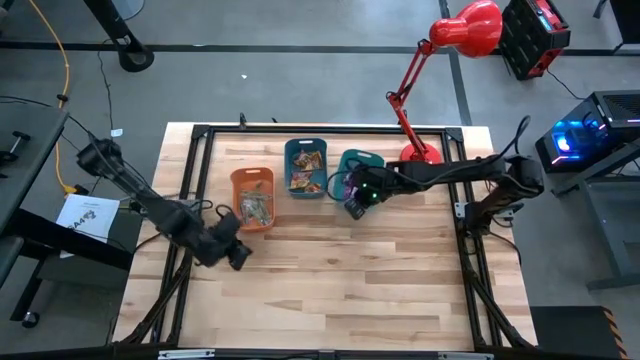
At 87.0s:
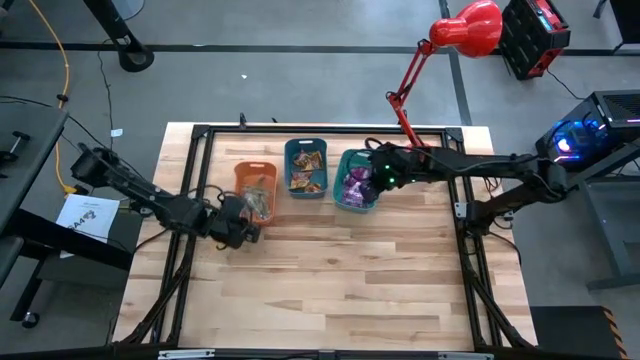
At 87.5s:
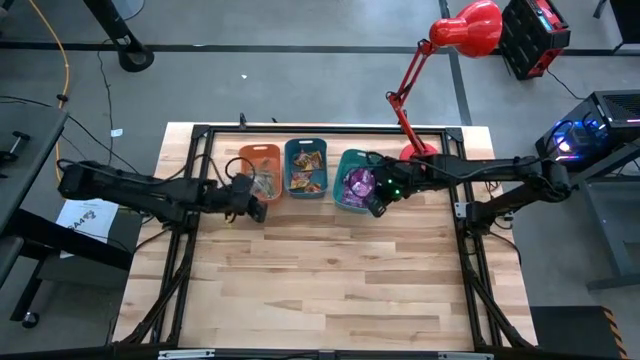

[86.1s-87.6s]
Task: Sort candy
Adjust the orange bin

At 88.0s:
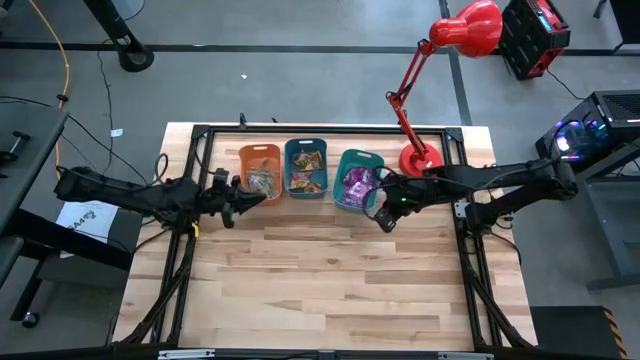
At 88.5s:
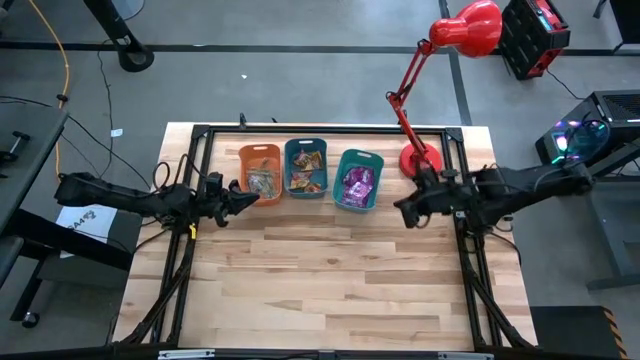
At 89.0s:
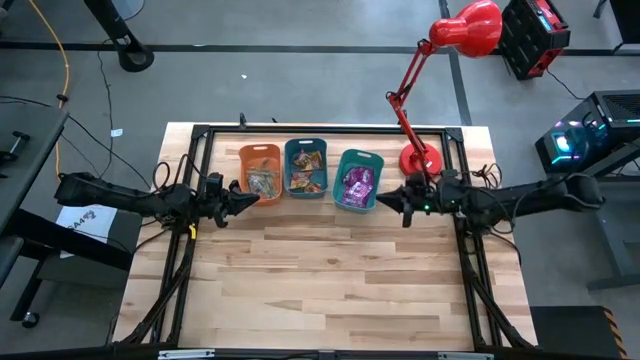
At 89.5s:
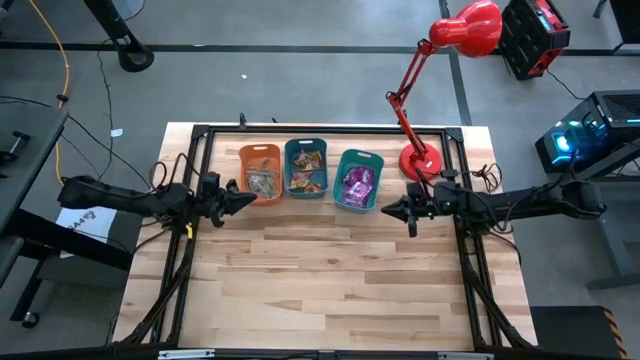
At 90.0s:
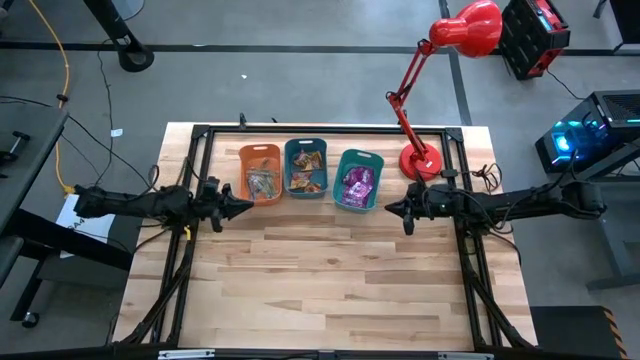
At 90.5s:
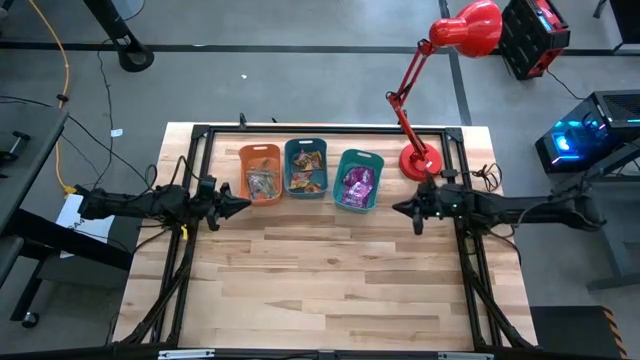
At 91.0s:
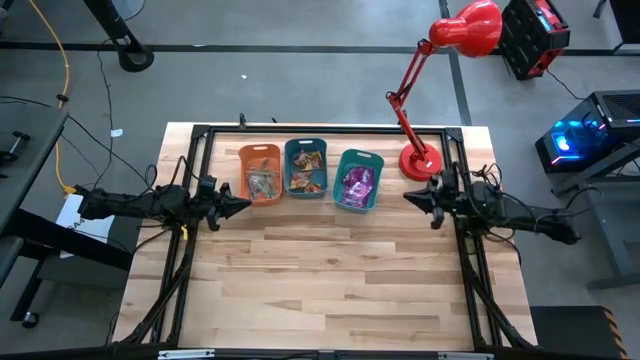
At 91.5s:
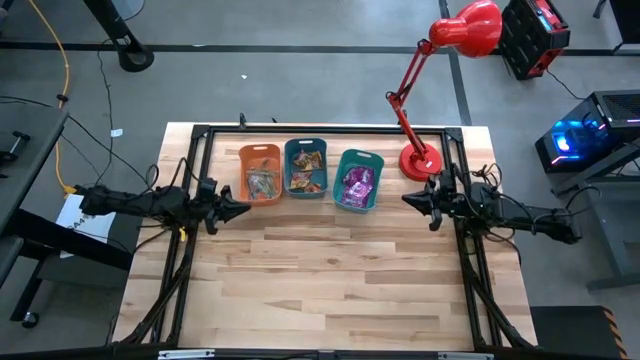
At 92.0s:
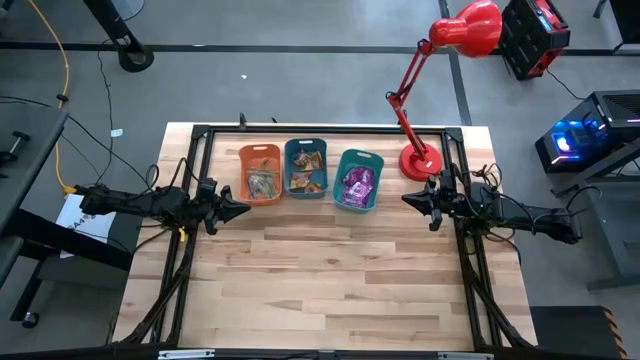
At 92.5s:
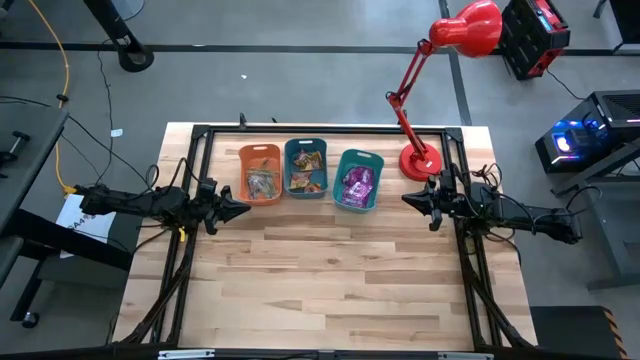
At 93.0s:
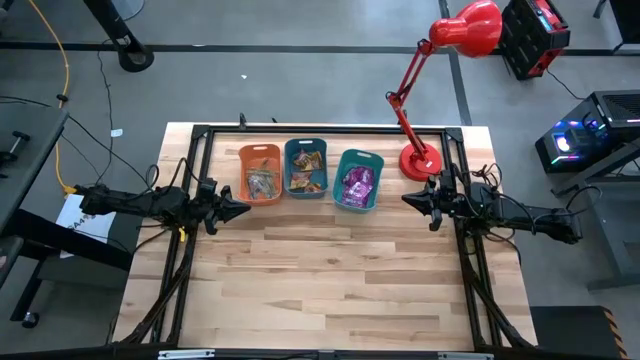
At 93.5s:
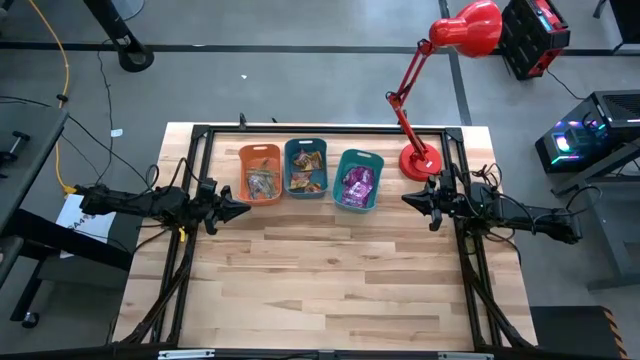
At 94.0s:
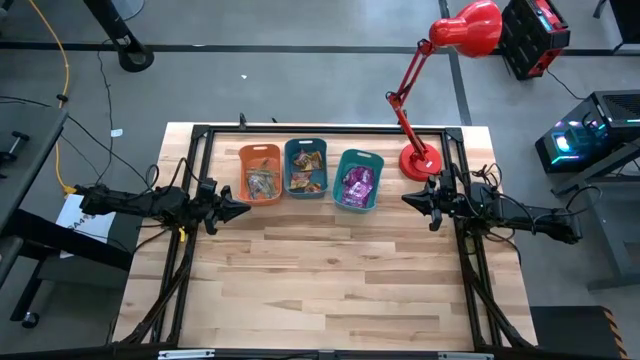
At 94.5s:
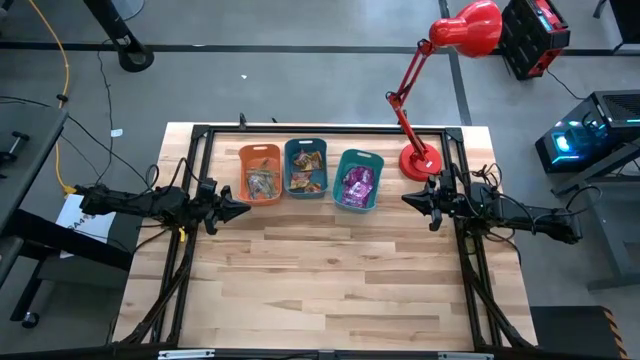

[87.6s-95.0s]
Return to Home Position

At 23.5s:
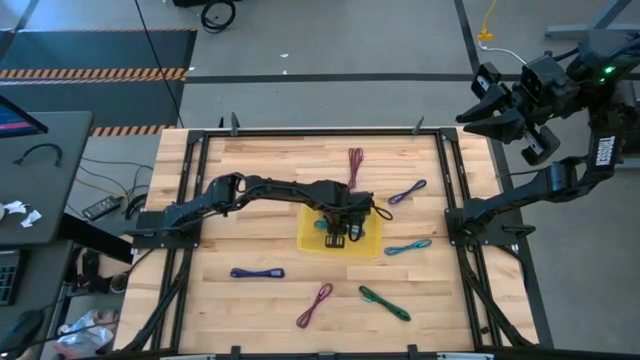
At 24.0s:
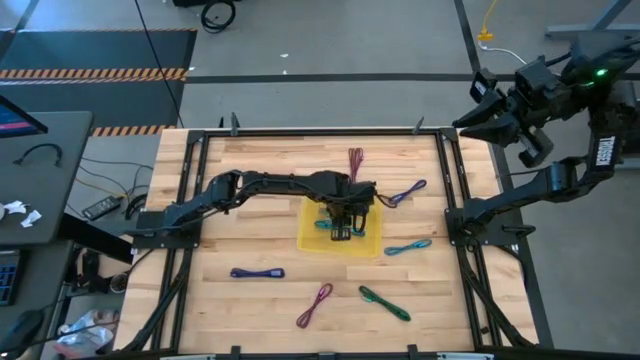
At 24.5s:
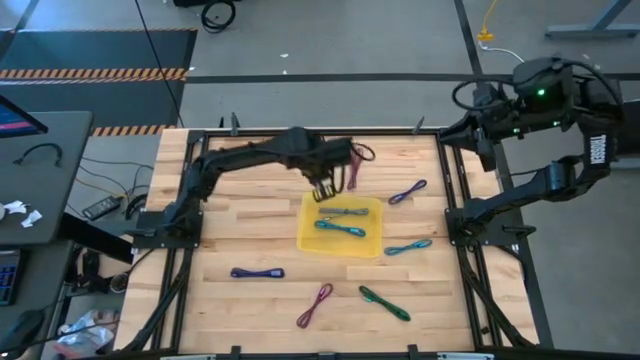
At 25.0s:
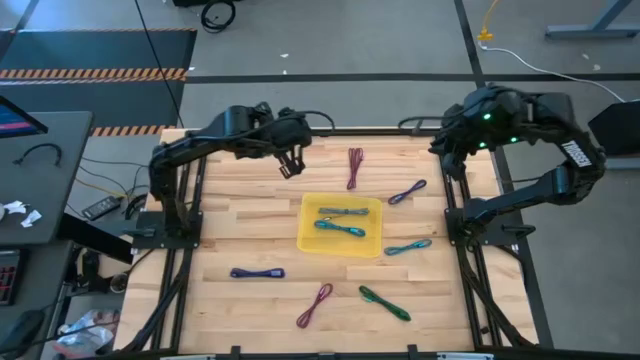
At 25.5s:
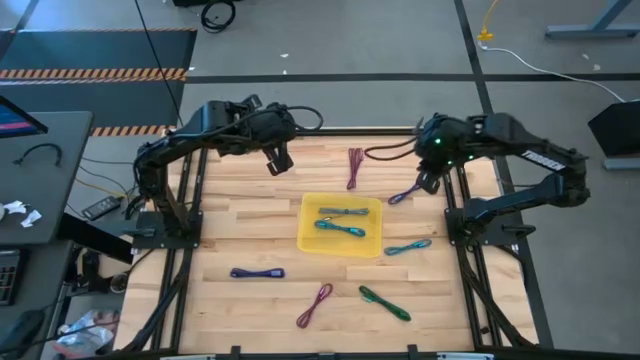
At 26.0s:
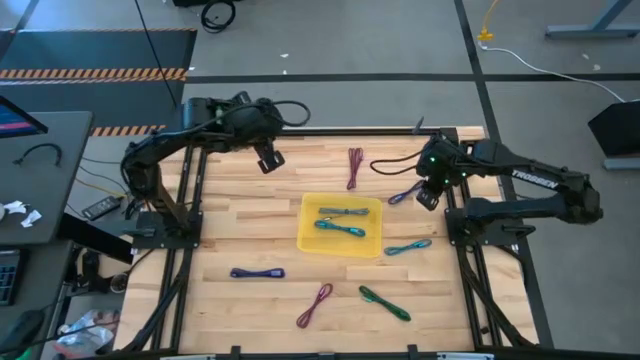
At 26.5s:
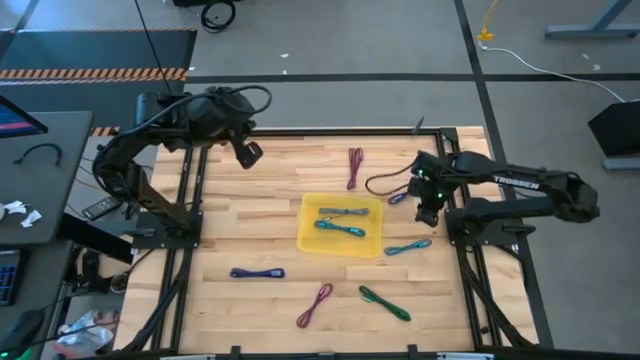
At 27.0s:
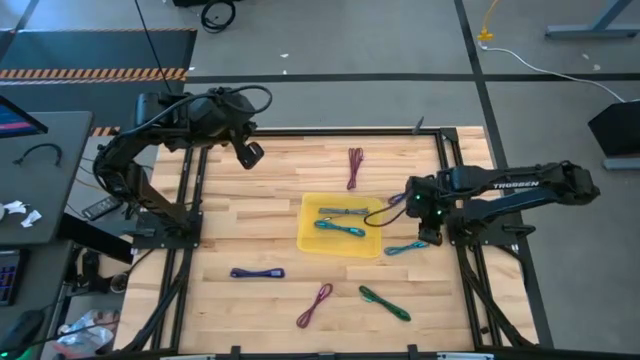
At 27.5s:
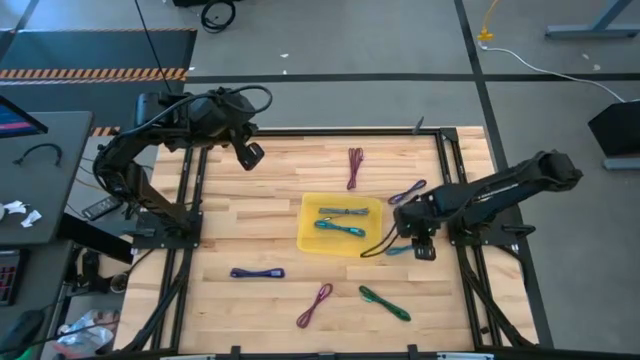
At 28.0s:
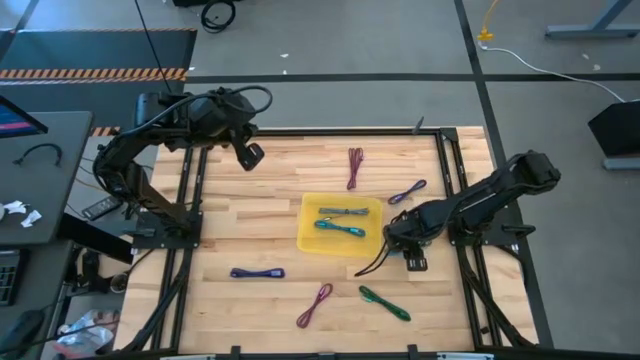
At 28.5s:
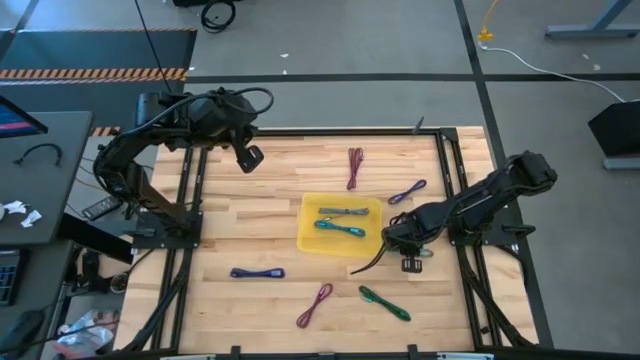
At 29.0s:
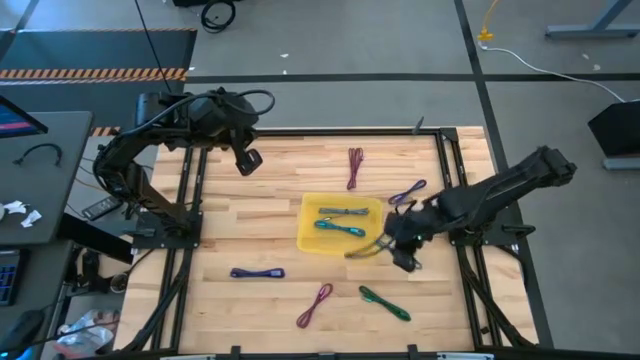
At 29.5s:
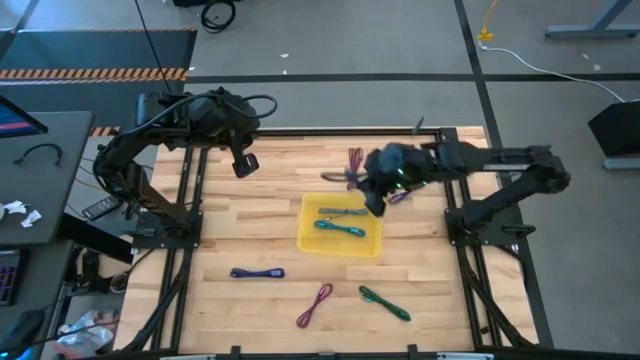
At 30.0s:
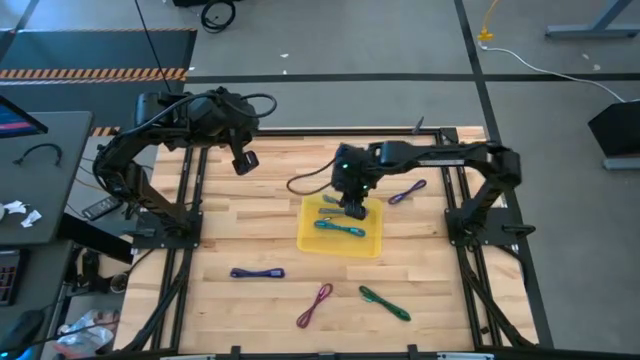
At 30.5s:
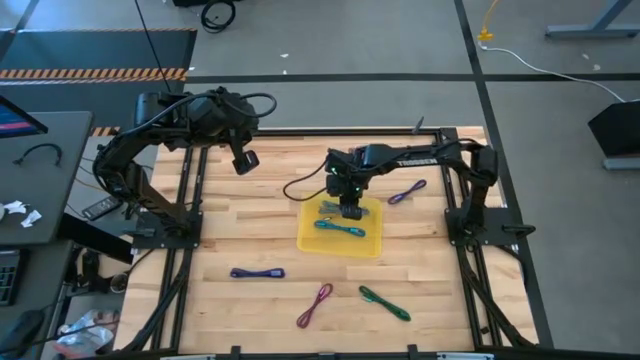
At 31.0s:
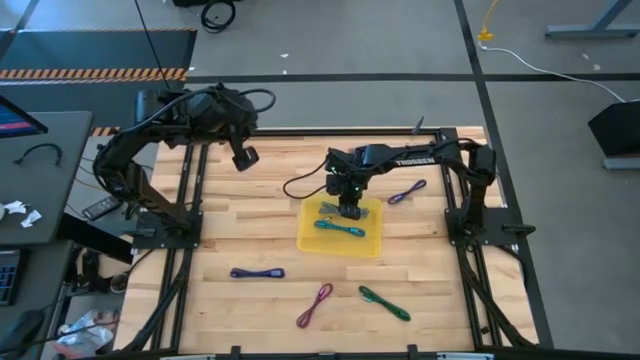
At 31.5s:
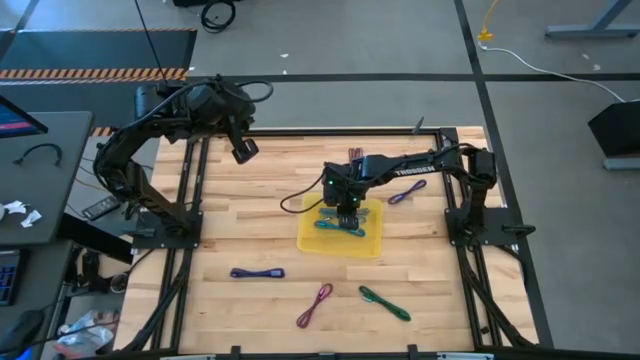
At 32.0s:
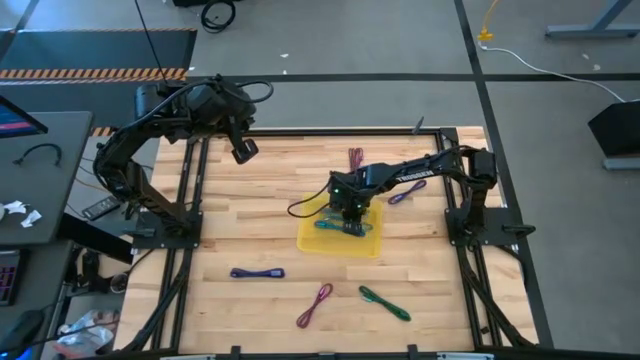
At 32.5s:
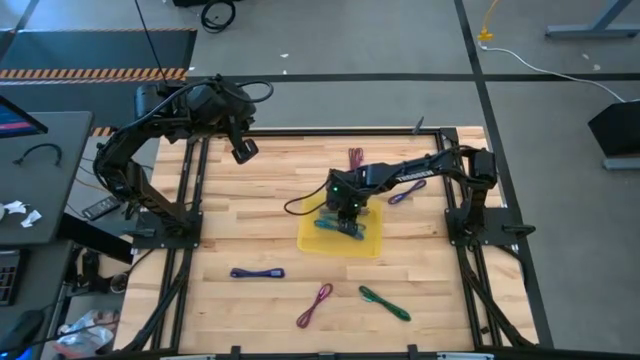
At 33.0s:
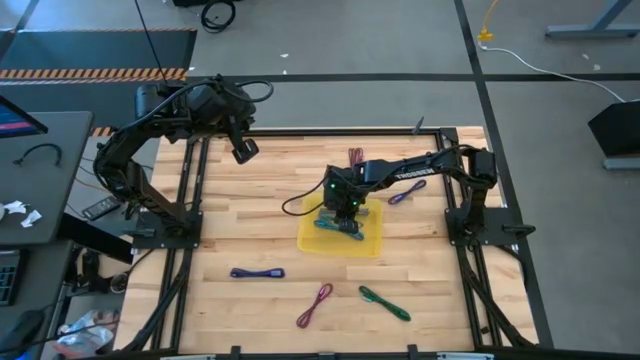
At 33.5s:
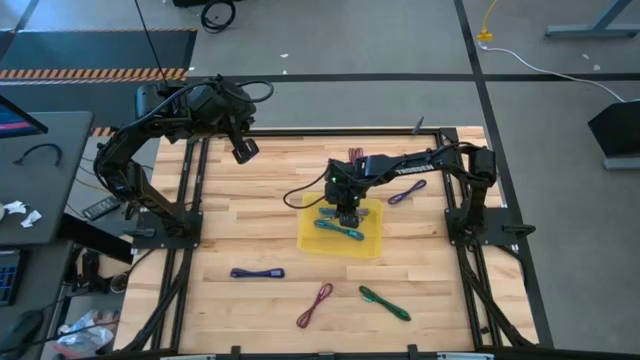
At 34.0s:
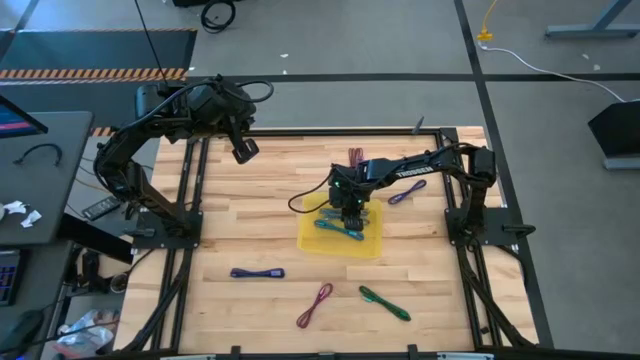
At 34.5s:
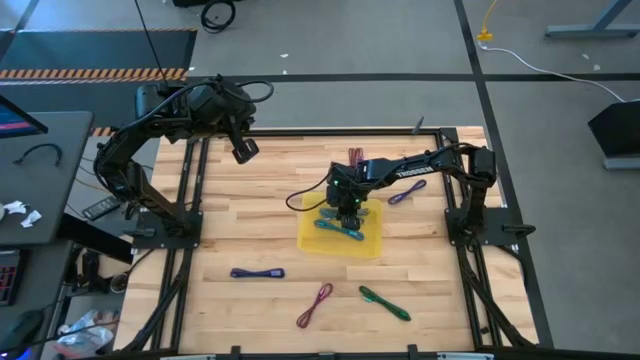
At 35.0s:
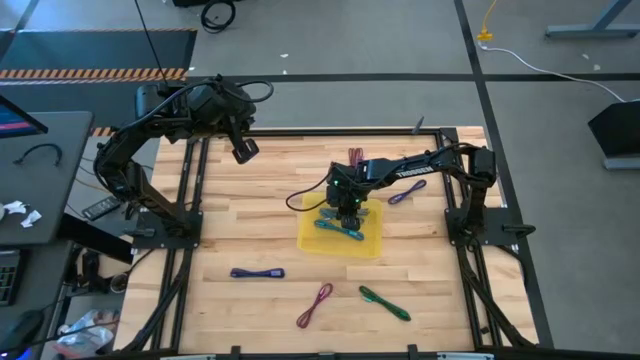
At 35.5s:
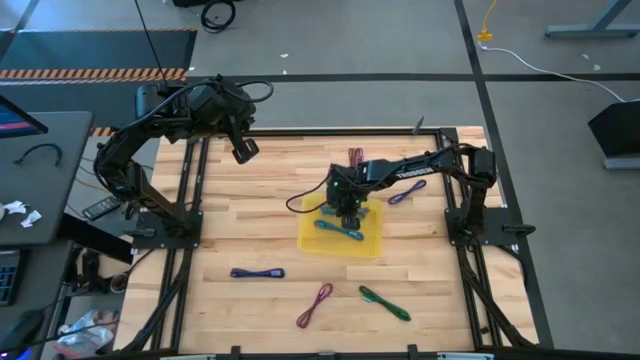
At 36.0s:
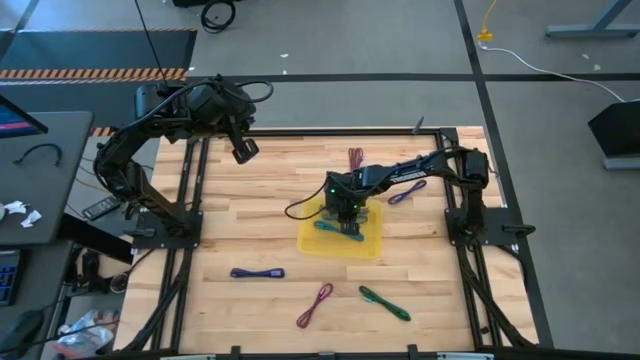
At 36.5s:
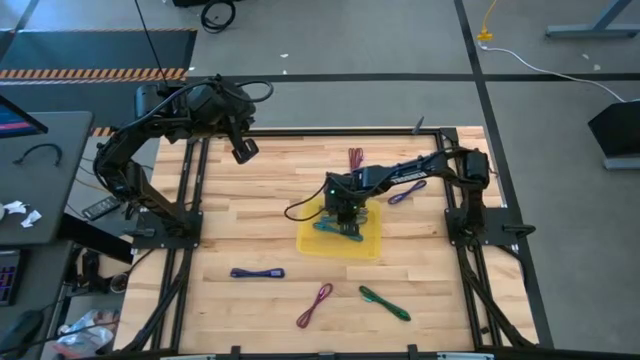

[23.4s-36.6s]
Task: Pick and place USB-C Cables
Put the blue charger cable into the yellow bin
